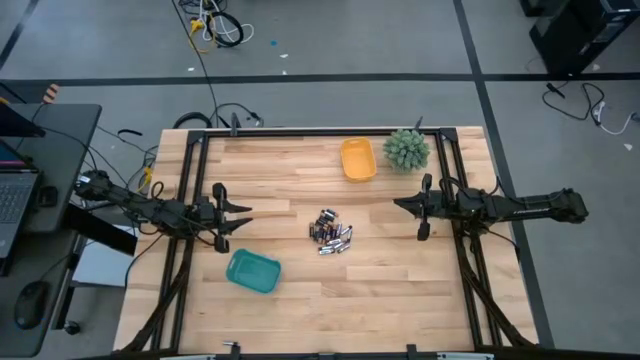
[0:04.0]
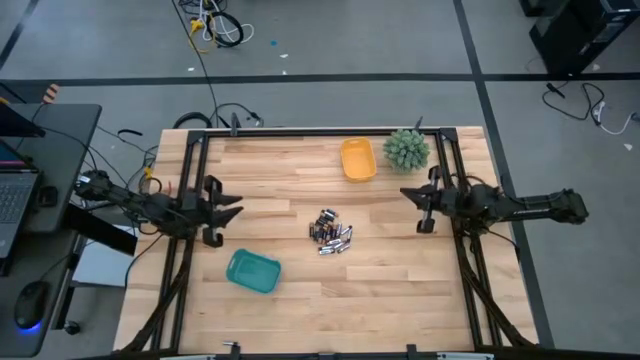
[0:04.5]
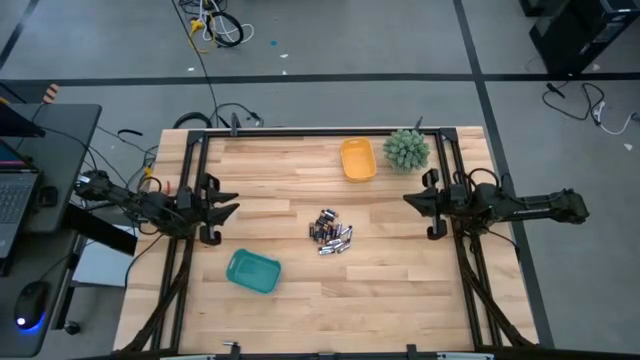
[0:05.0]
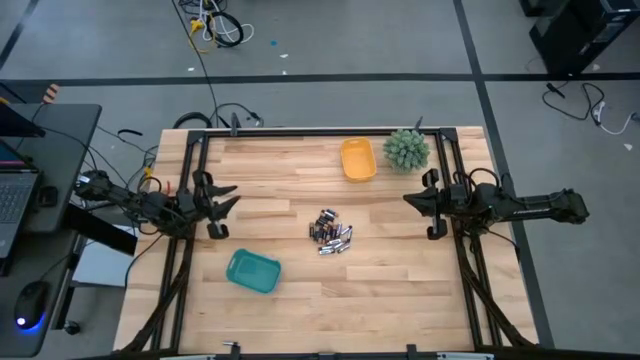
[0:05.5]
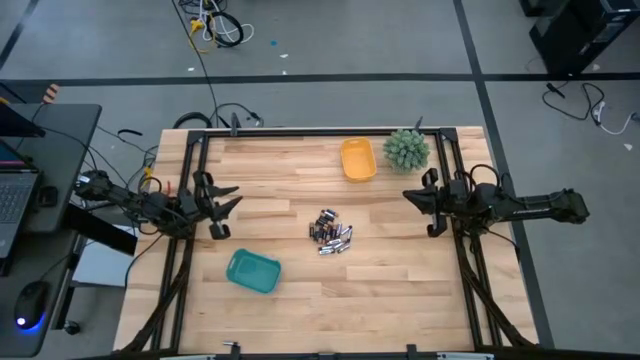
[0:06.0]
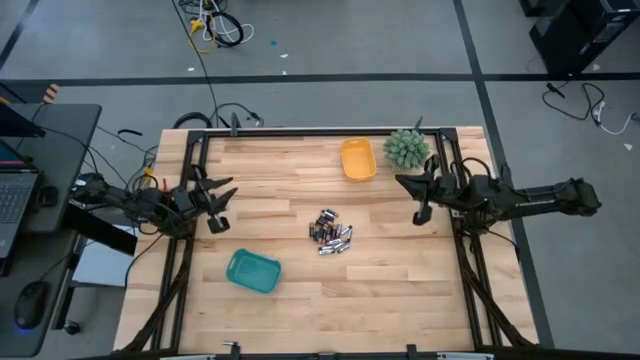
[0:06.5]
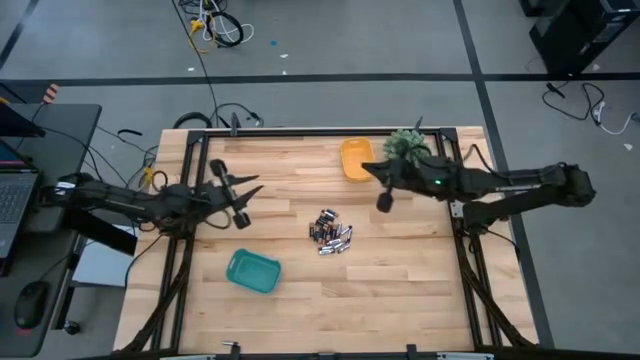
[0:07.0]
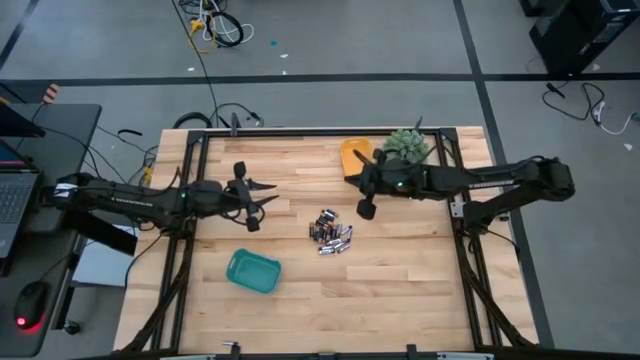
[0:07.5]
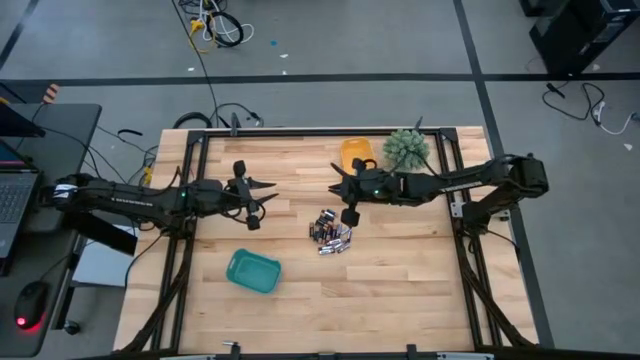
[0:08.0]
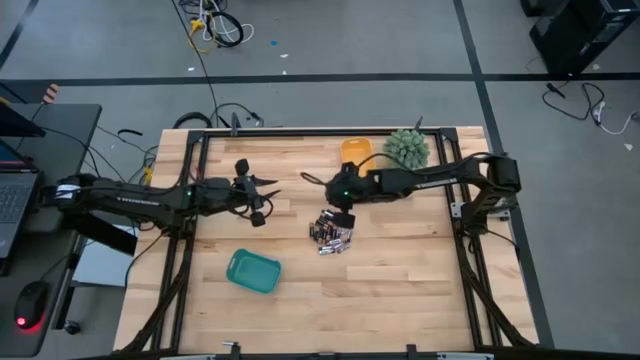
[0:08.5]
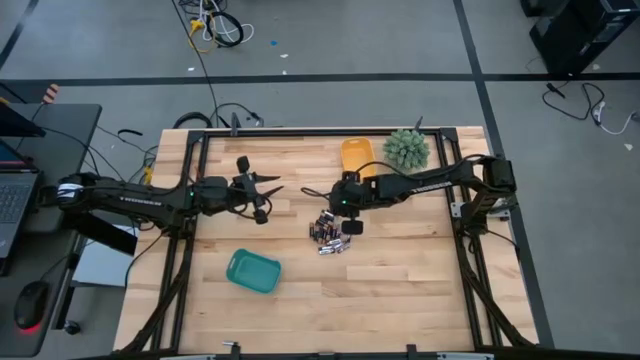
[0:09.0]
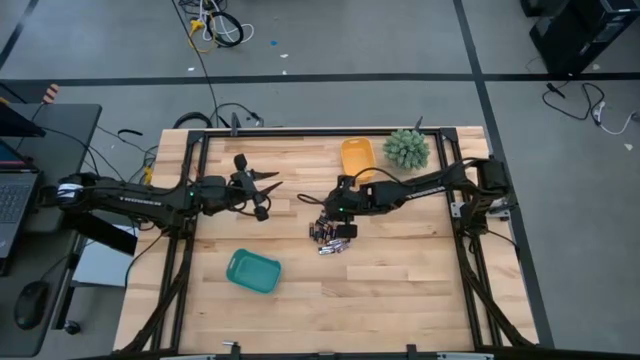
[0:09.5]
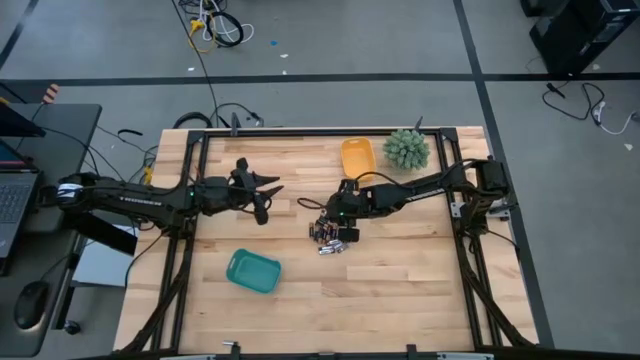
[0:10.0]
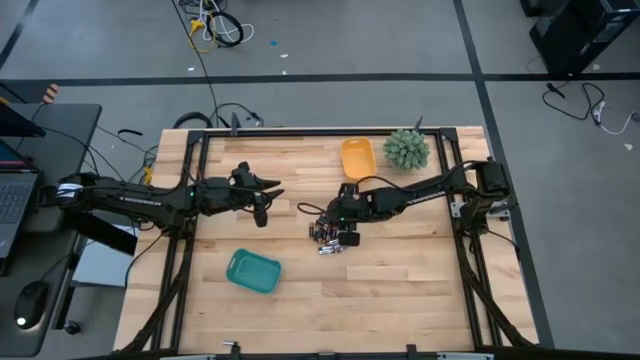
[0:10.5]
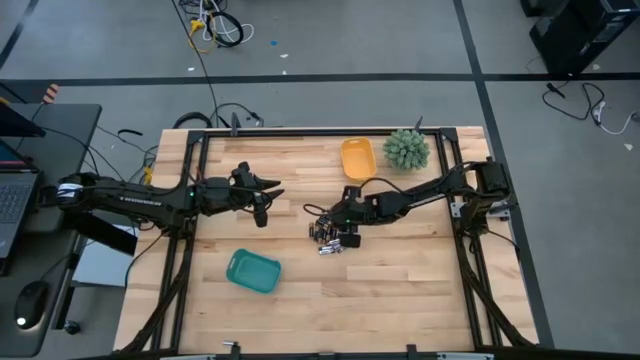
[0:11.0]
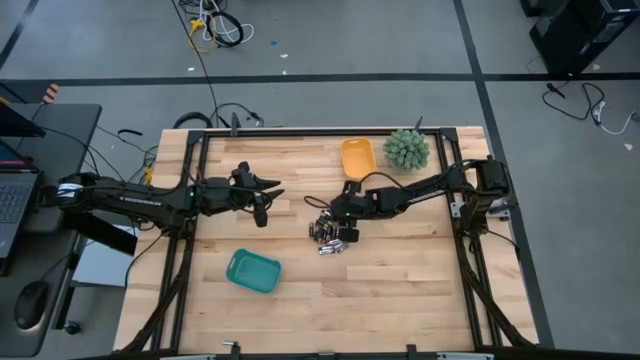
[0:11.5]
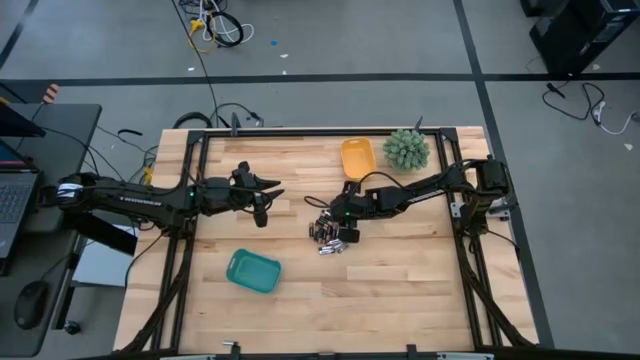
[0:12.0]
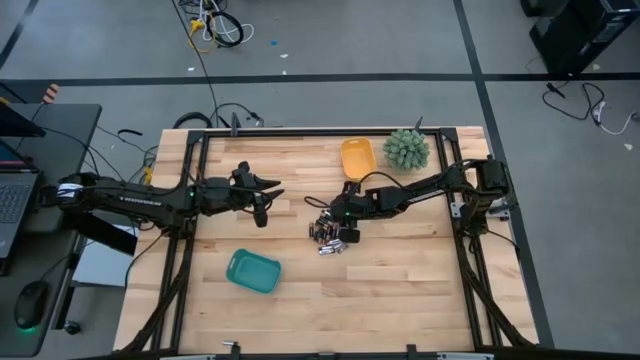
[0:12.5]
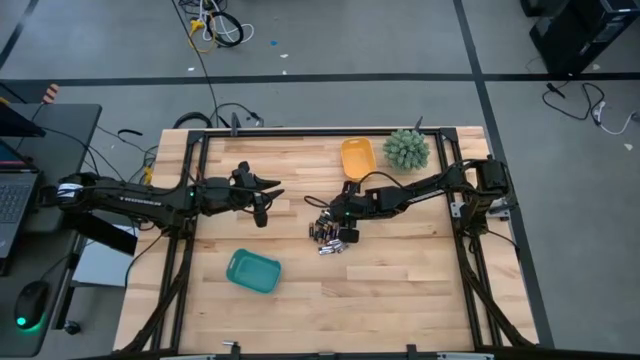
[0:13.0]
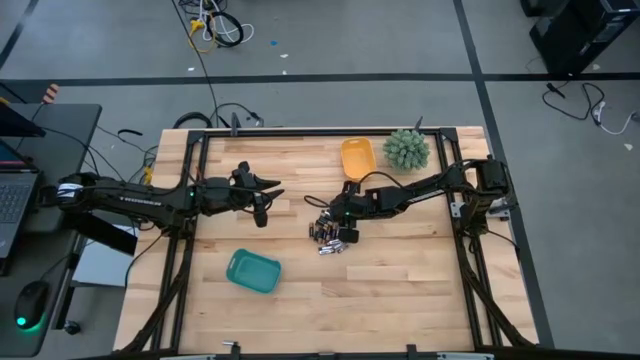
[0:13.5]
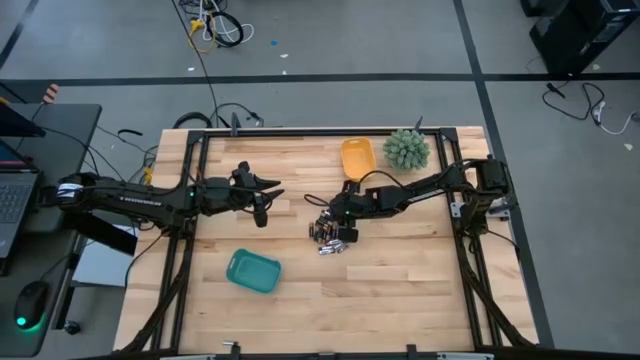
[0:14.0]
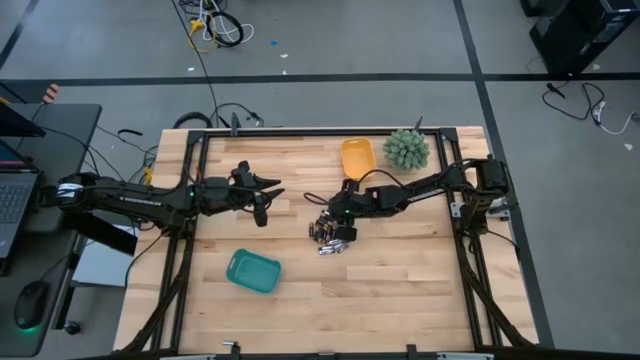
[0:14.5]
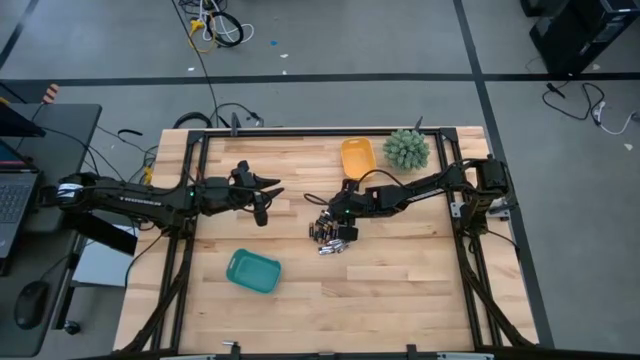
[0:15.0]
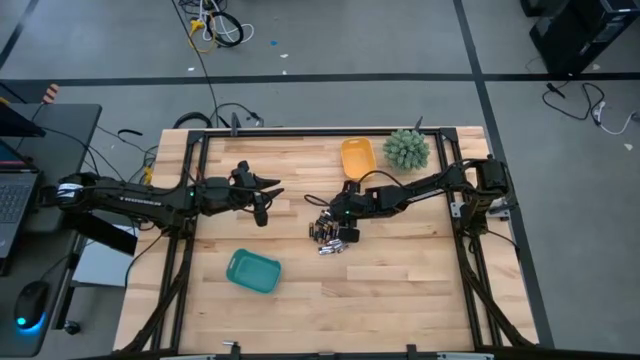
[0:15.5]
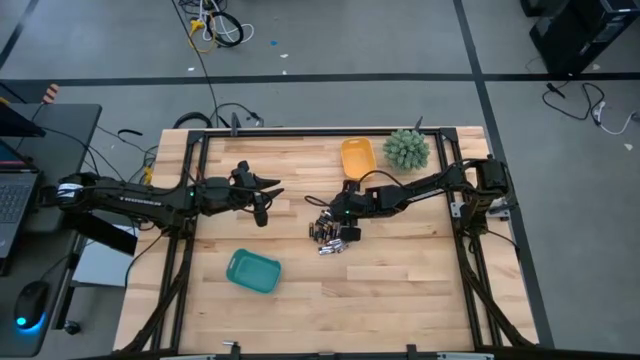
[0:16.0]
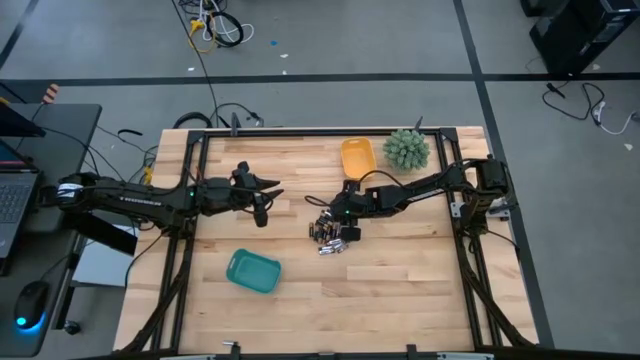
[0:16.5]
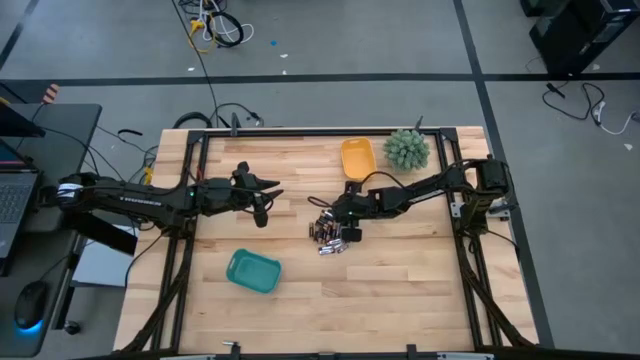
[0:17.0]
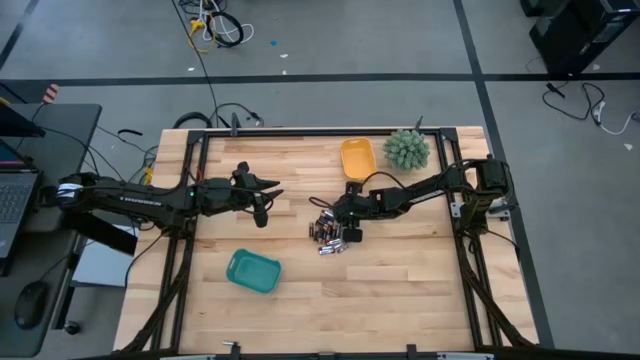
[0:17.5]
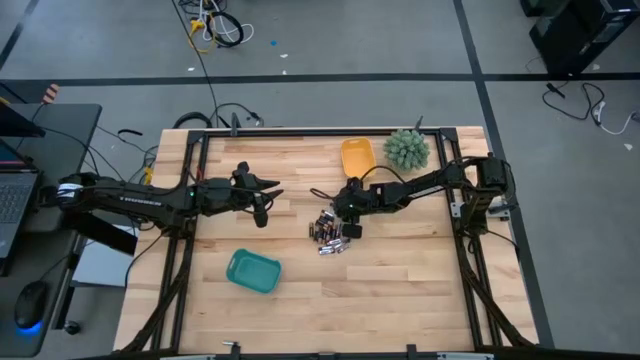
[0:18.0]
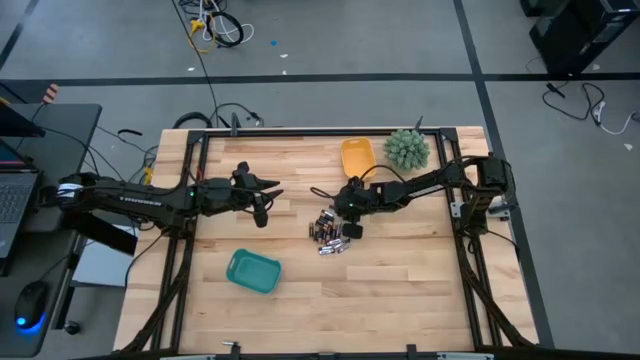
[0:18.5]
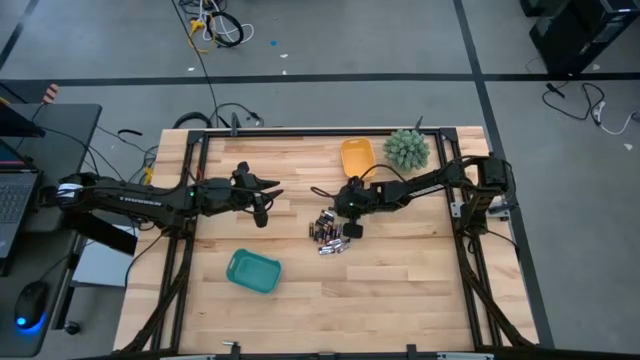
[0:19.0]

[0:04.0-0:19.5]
Task: Sort batteries
Put the black battery into the yellow bin

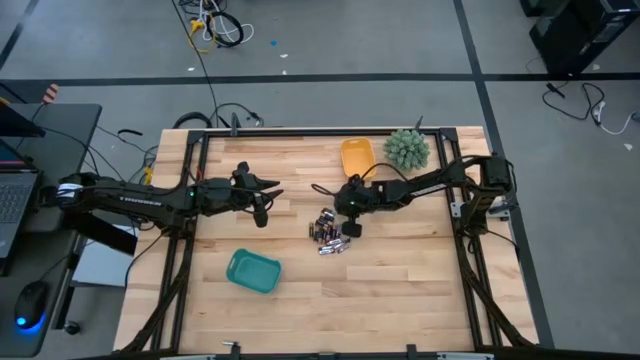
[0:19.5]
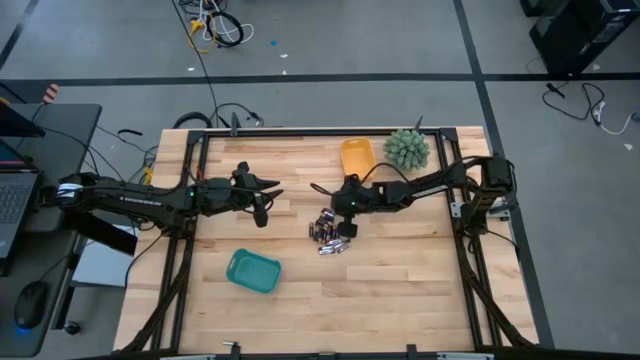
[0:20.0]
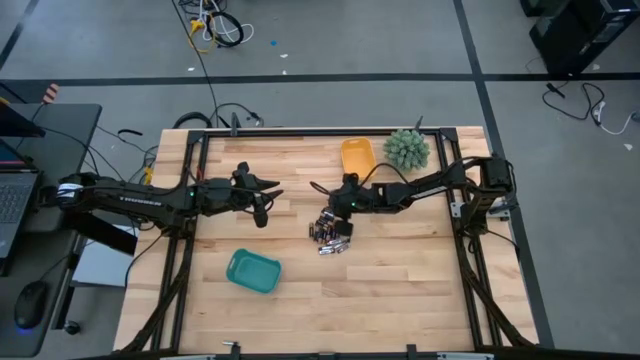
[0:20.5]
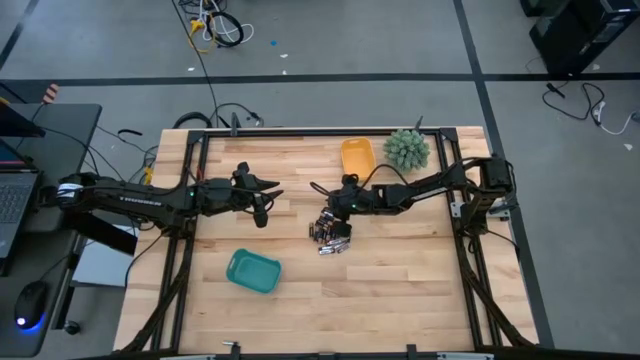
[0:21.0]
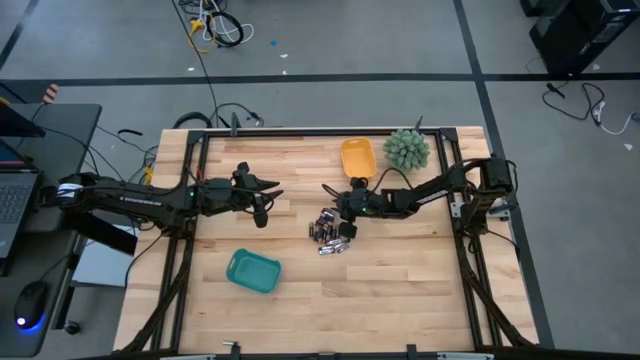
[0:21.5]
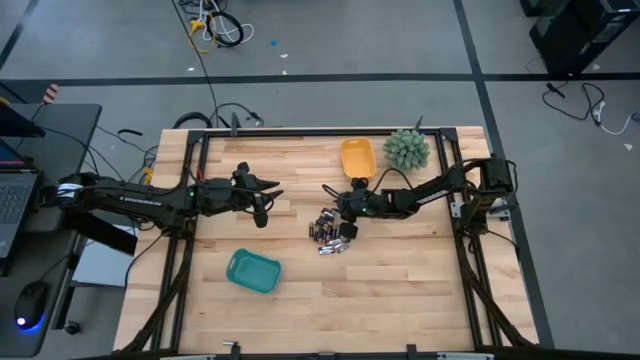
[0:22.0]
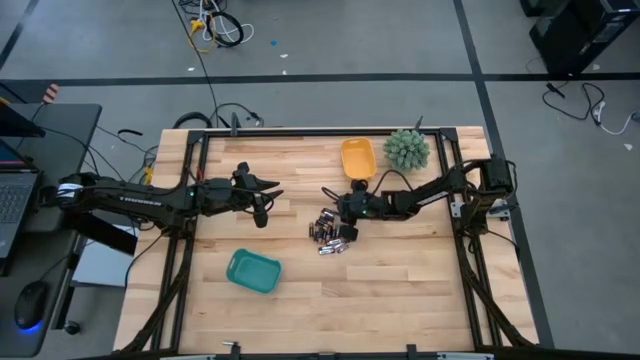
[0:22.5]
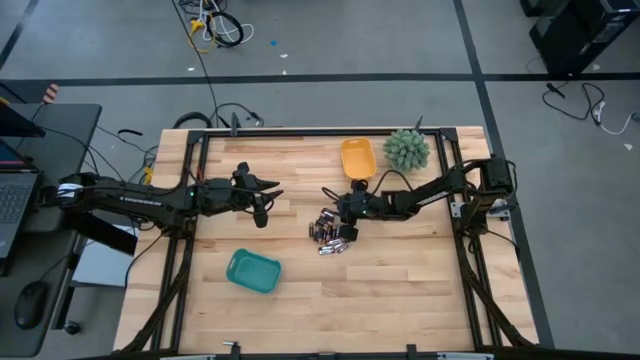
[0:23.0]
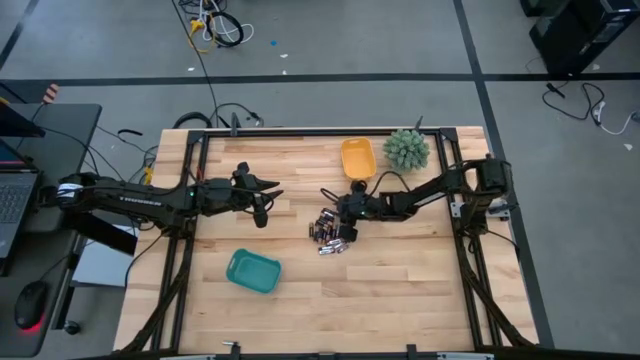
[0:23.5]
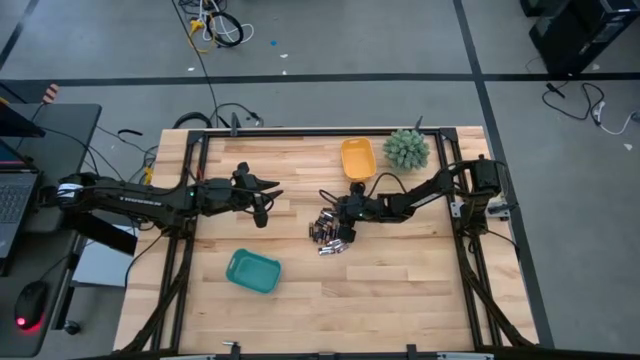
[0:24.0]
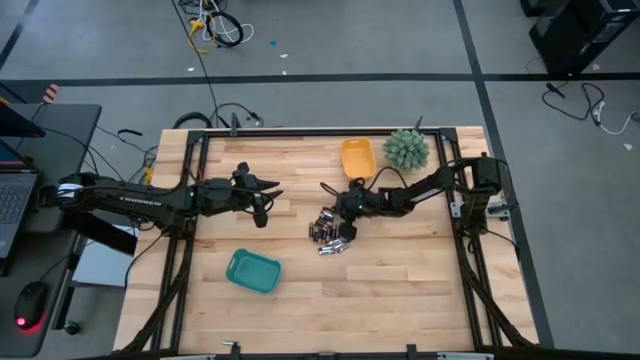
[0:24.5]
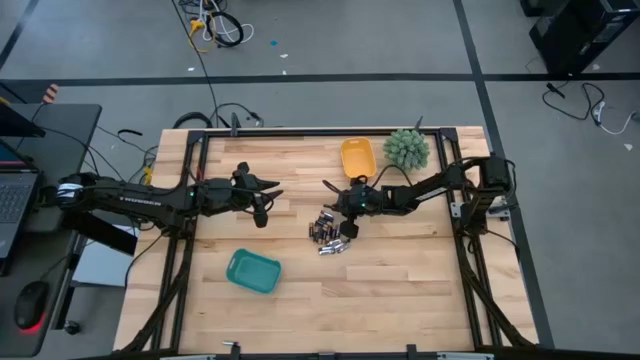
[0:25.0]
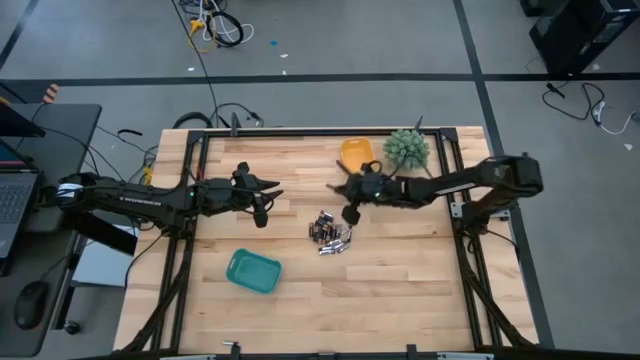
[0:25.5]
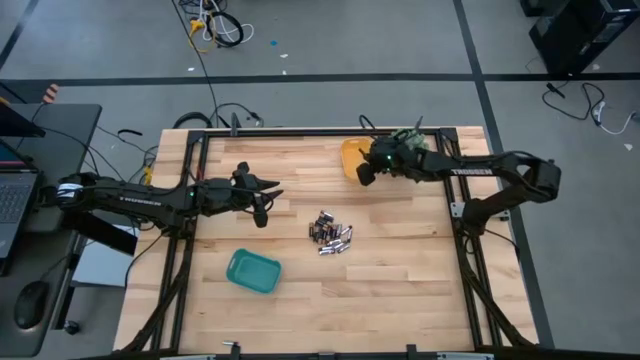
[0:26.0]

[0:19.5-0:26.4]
Put the black battery into the yellow bin

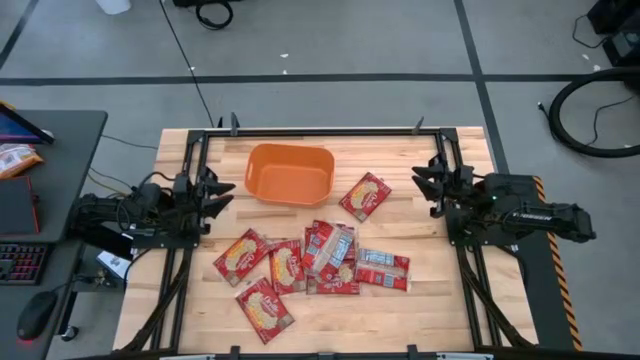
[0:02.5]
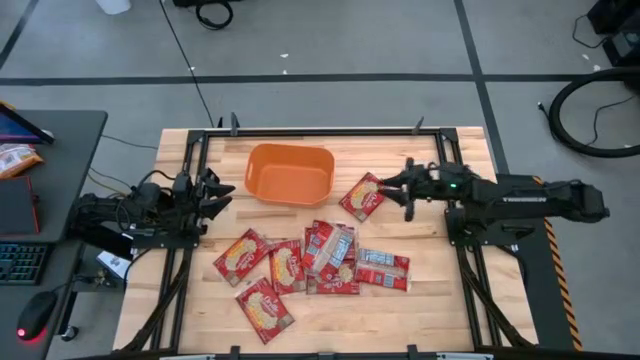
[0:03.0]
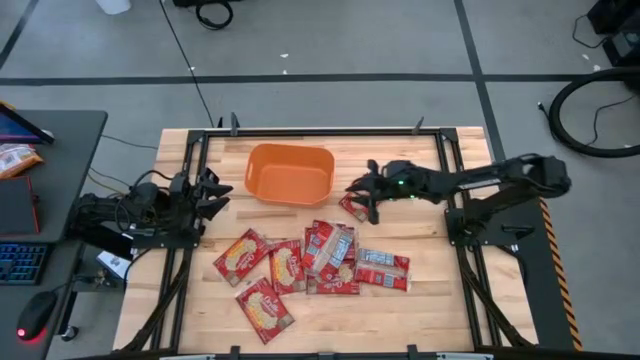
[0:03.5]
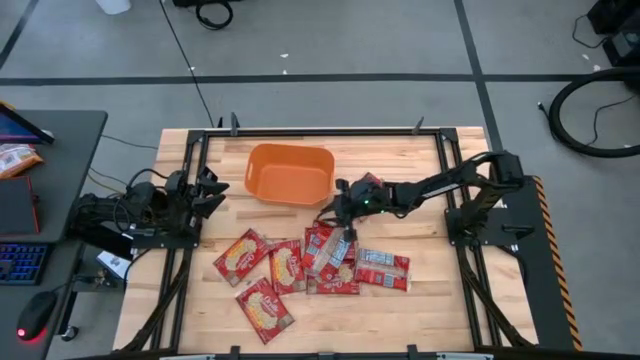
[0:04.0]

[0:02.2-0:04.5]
Task: Sort popcorn bags into baskets
Adjust the orange bin
